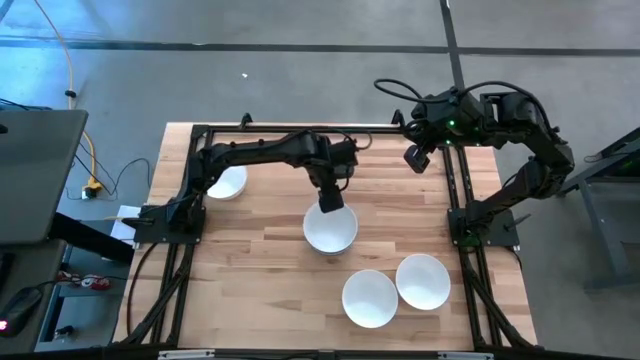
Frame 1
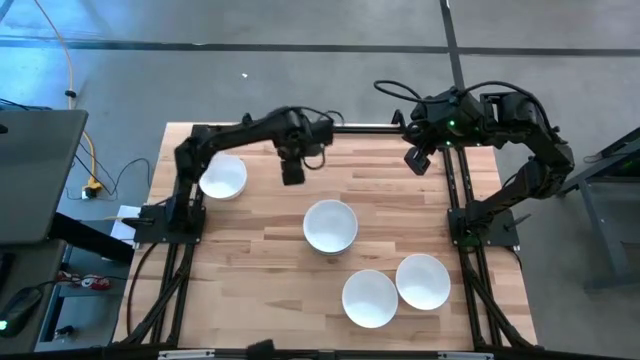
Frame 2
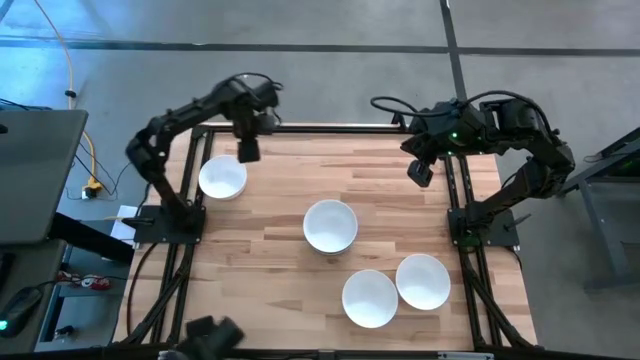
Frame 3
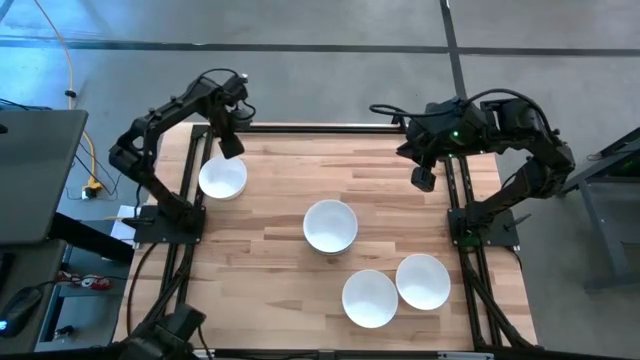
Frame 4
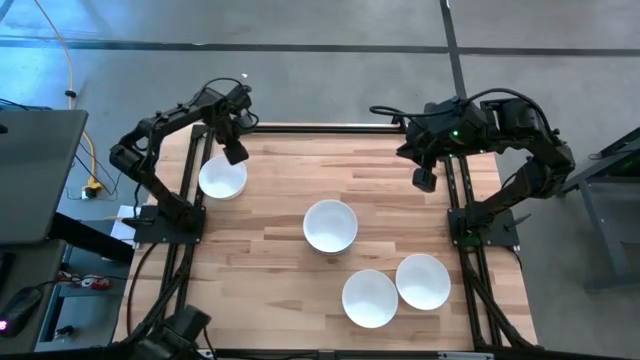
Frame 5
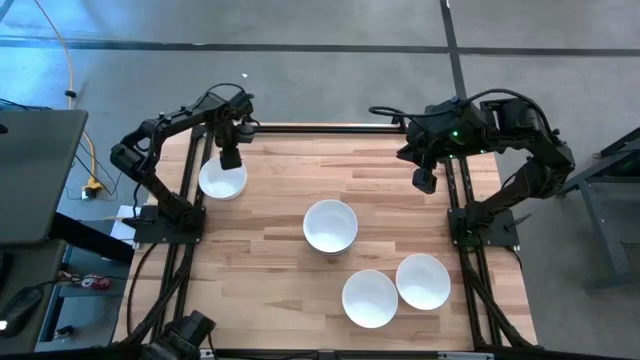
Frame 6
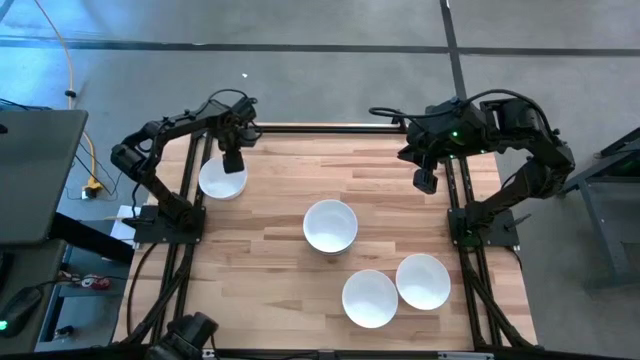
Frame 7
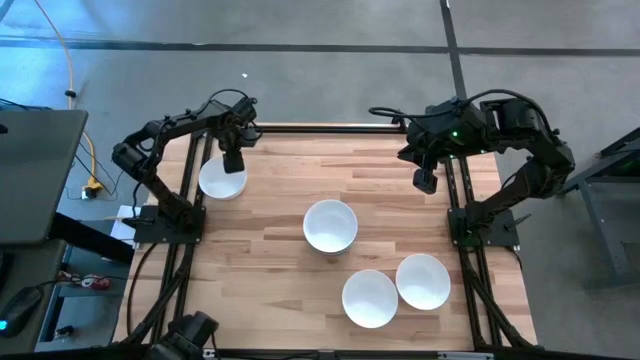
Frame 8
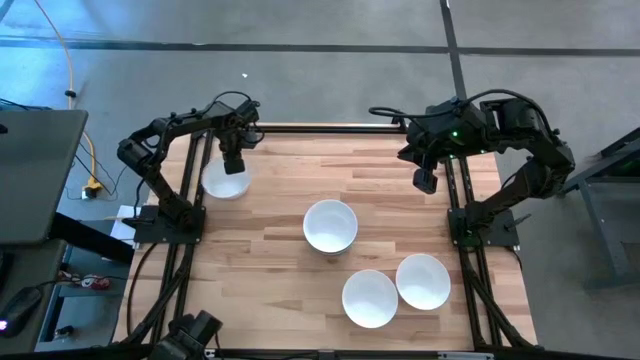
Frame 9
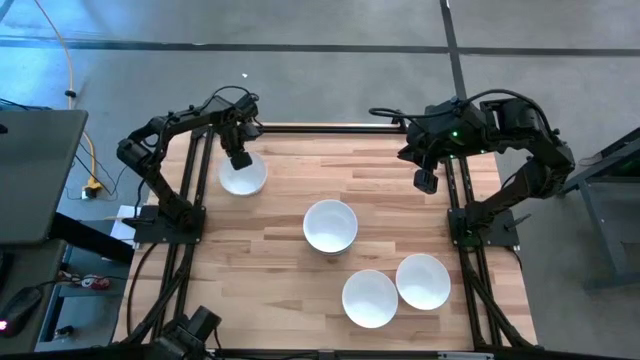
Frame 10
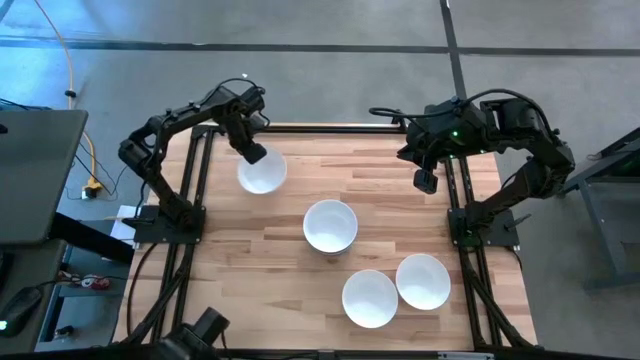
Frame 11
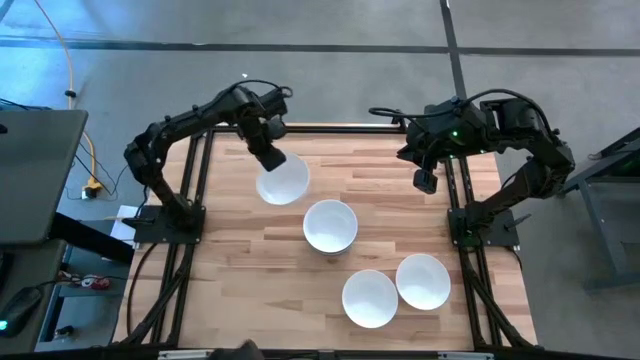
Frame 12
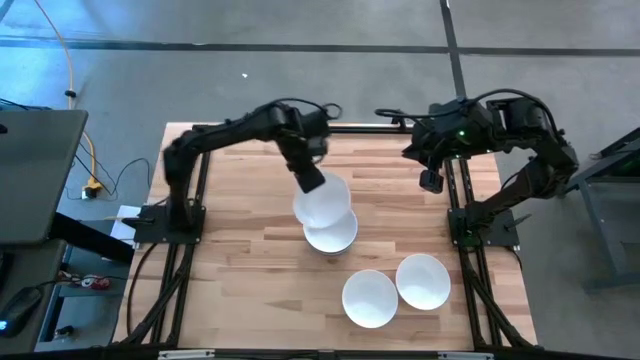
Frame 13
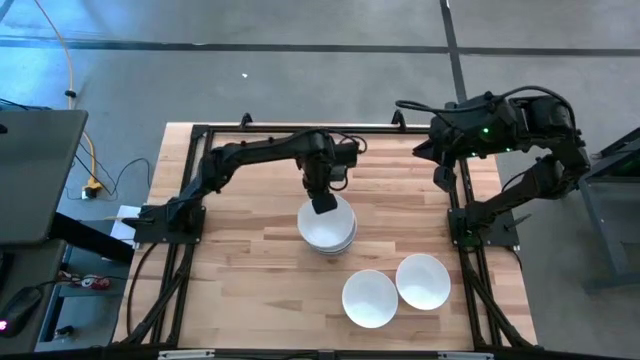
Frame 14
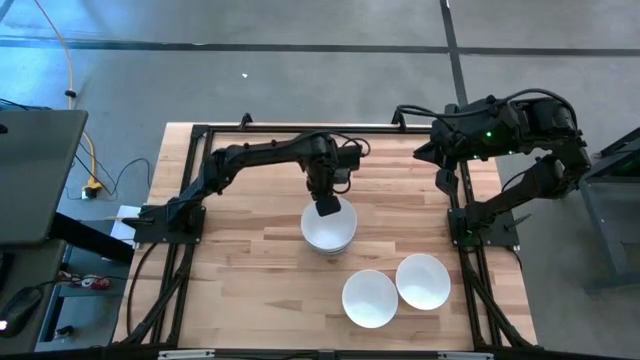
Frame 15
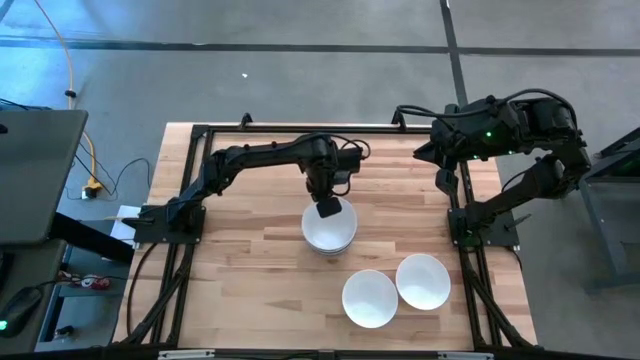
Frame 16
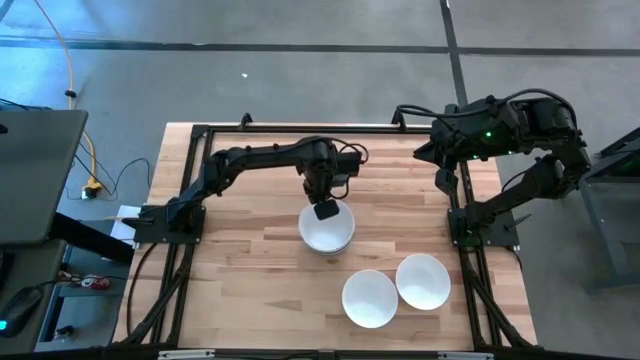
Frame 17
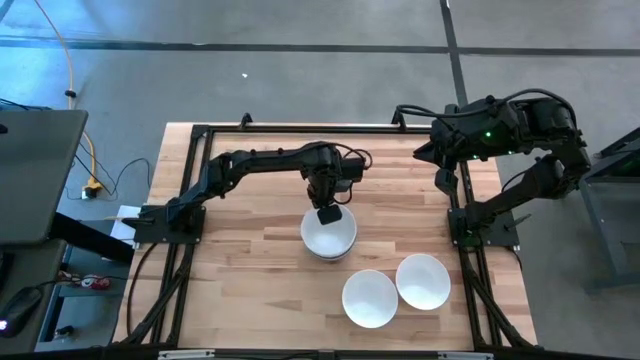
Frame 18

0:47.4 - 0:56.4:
Task: Nest bowls inside each other
Stack the white bowl on top of the white bowl

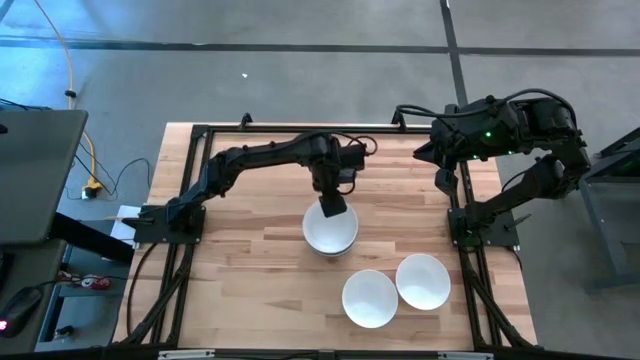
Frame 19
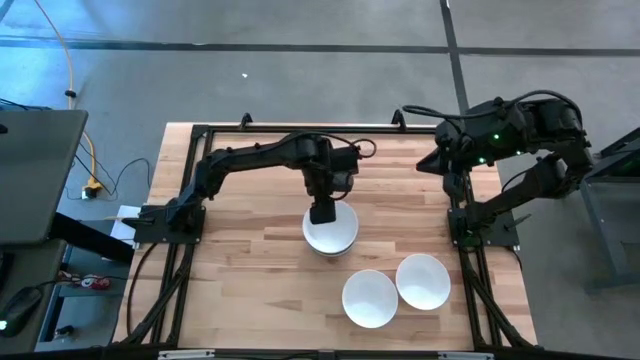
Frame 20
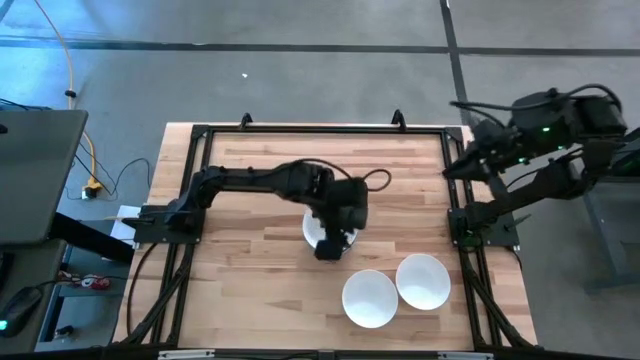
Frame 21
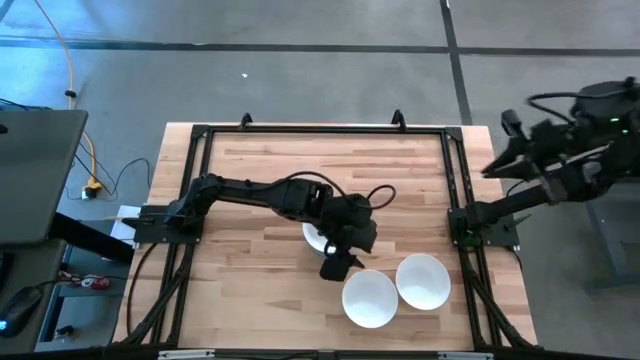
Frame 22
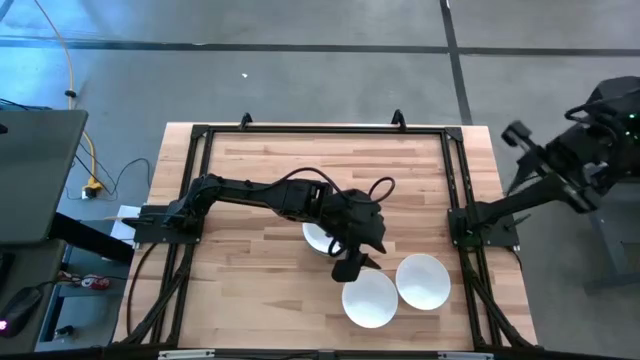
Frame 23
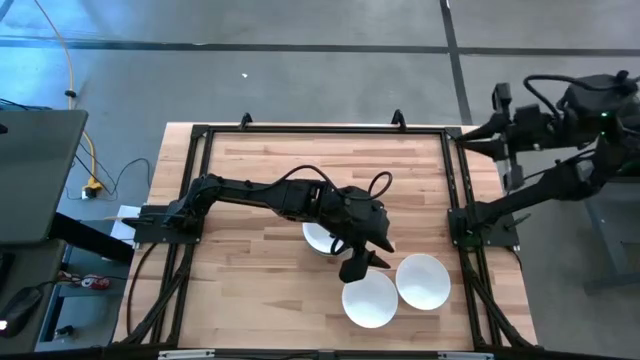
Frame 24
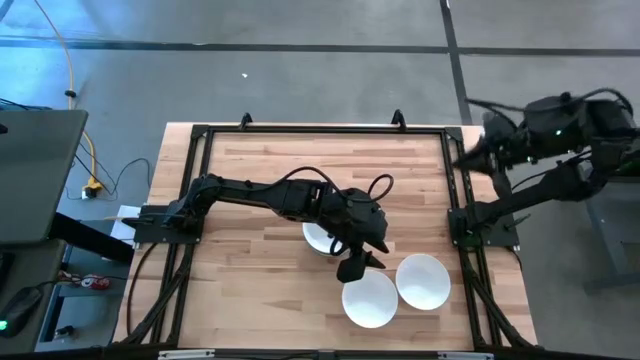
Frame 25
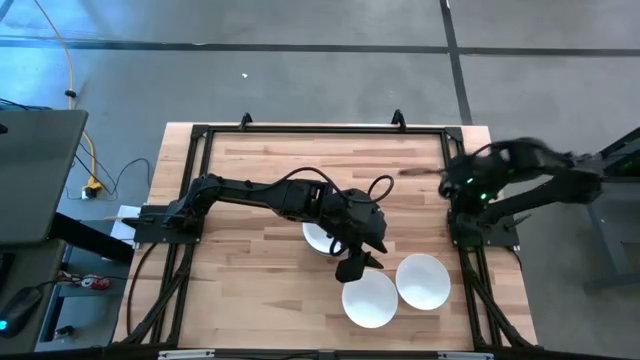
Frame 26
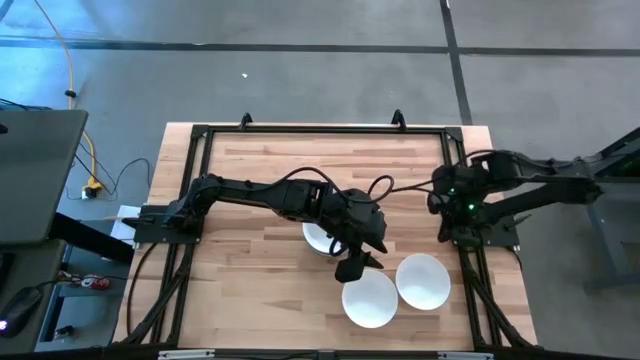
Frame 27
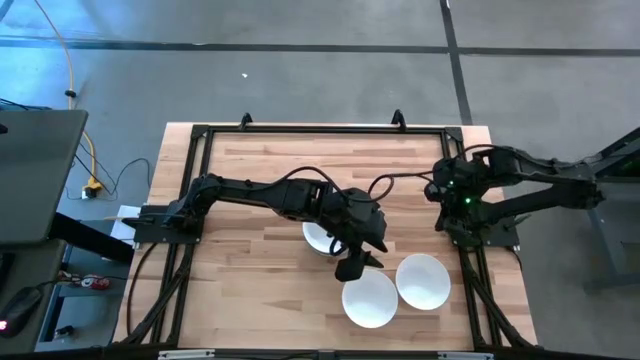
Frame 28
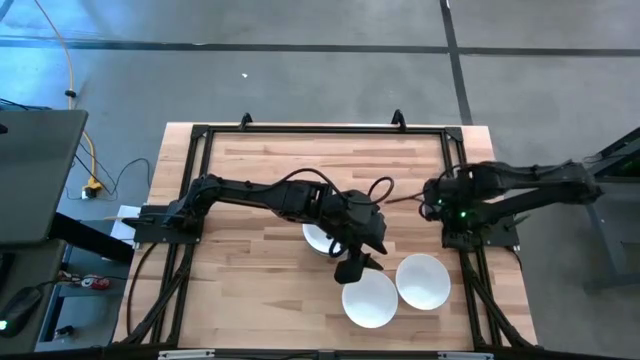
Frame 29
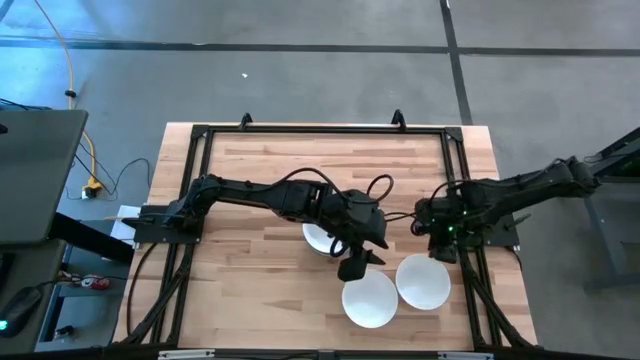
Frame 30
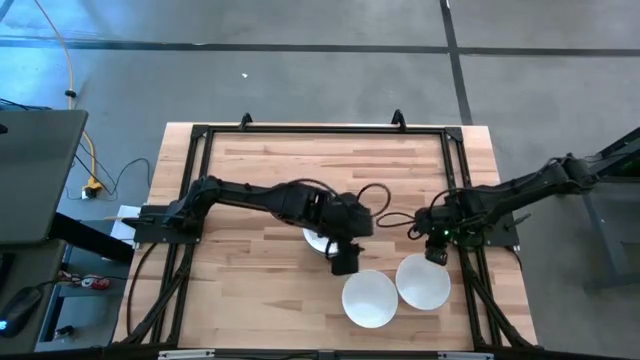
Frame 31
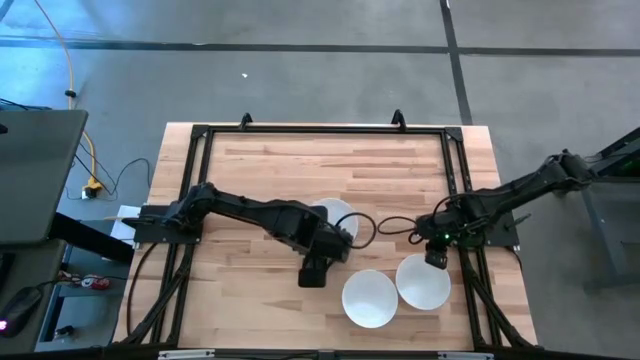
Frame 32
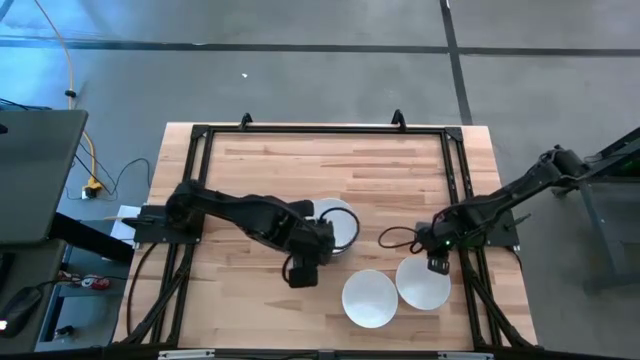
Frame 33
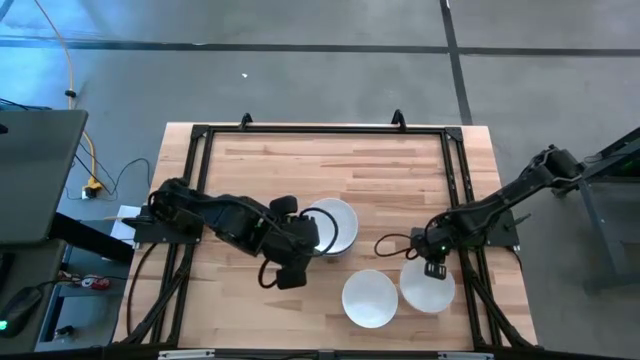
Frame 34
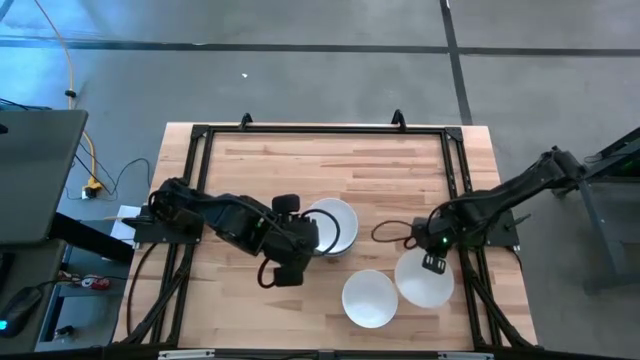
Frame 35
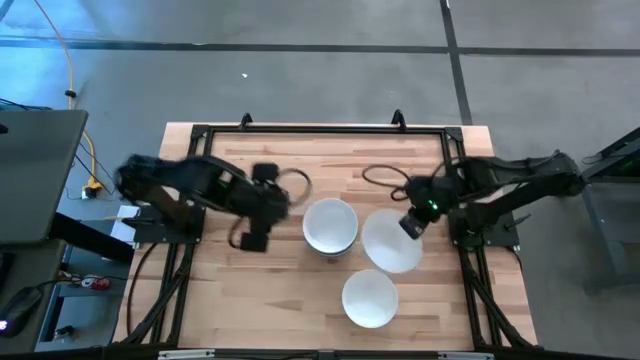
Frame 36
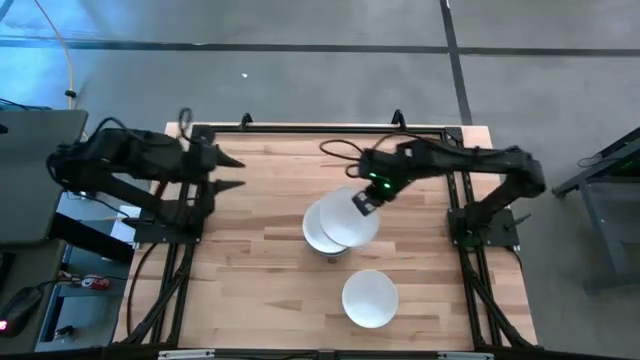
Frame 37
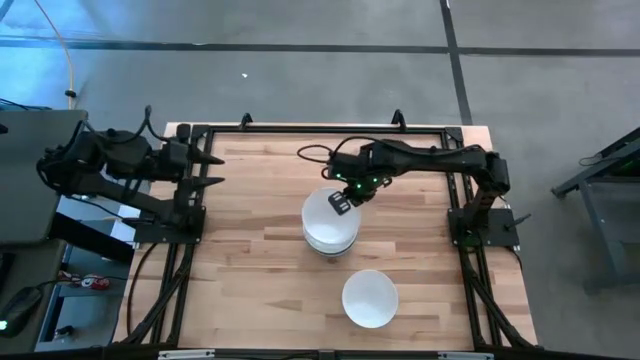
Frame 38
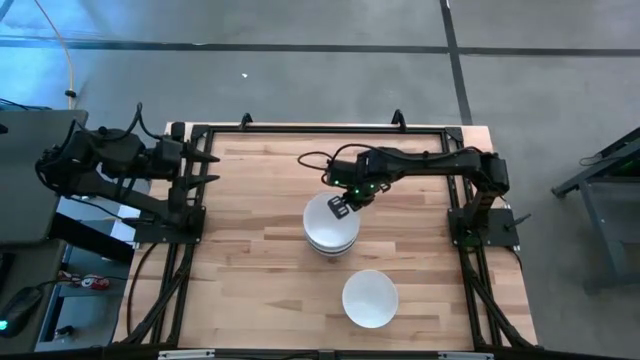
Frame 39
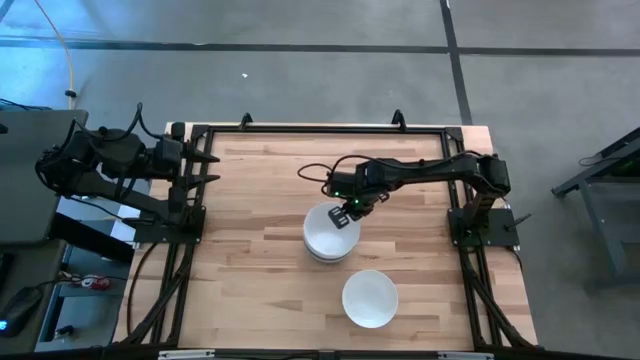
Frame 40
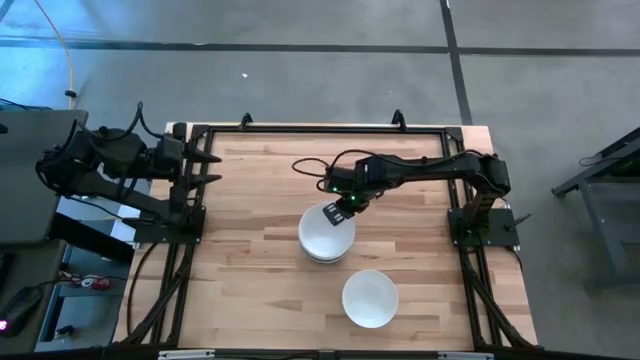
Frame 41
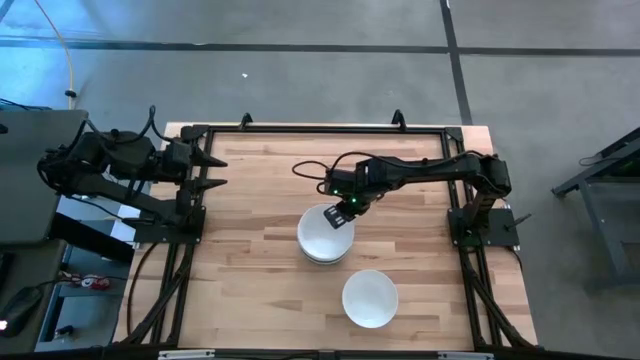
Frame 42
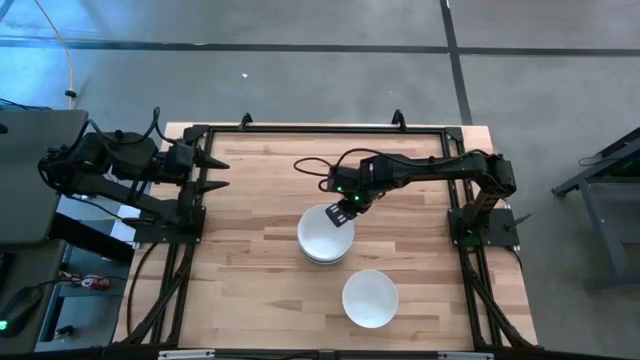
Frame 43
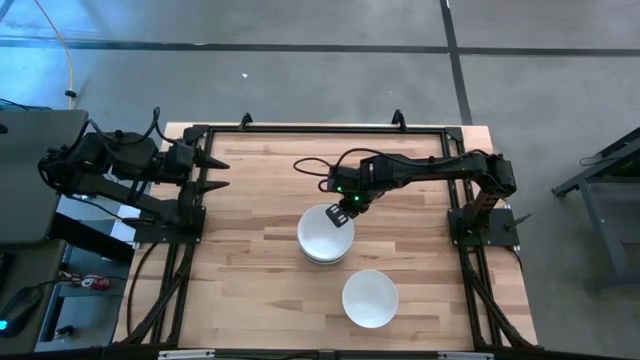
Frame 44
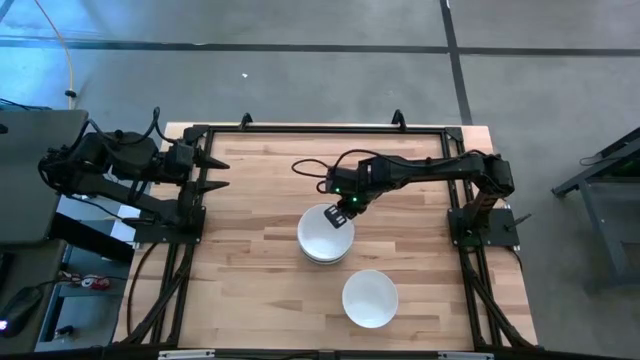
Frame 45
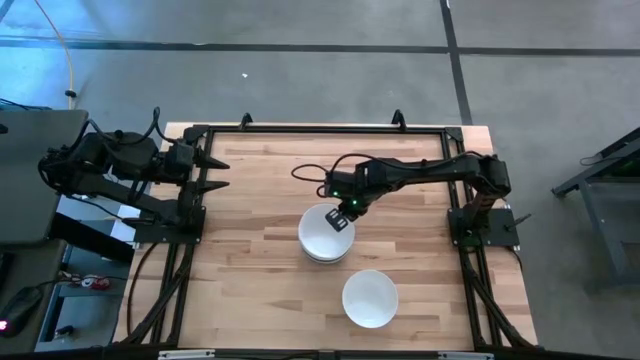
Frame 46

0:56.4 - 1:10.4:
Stack the white bowl on top of the white bowl
